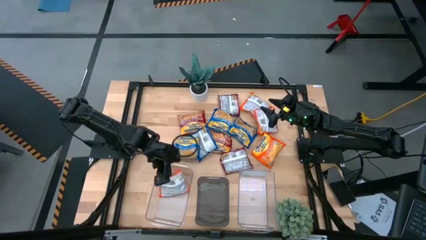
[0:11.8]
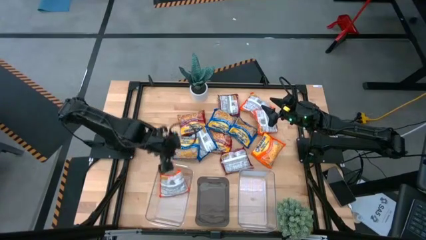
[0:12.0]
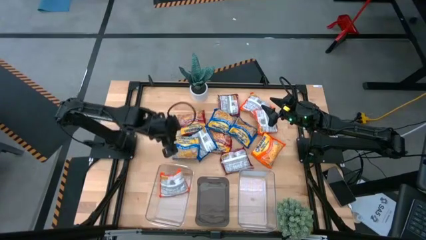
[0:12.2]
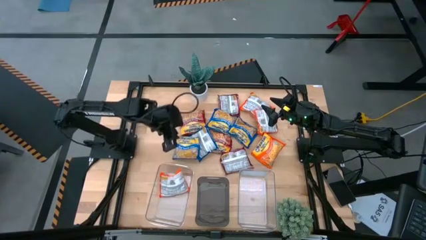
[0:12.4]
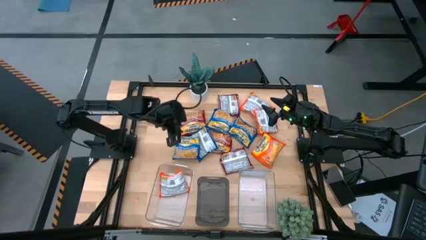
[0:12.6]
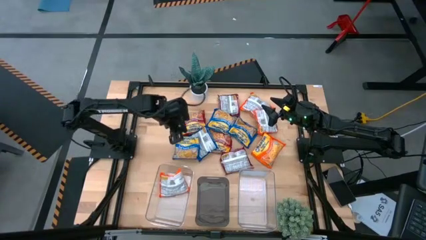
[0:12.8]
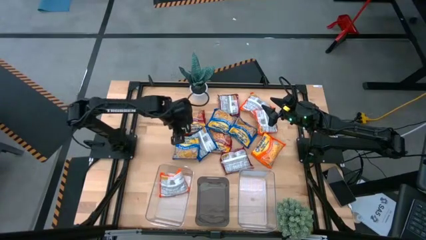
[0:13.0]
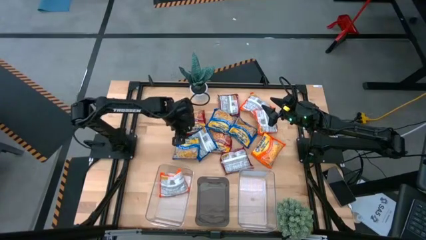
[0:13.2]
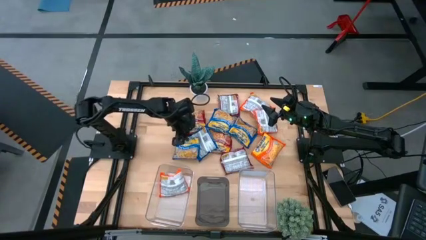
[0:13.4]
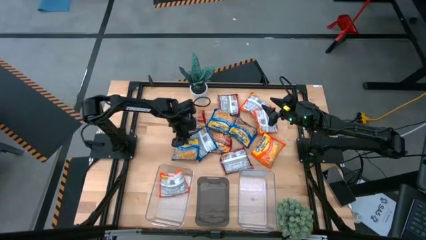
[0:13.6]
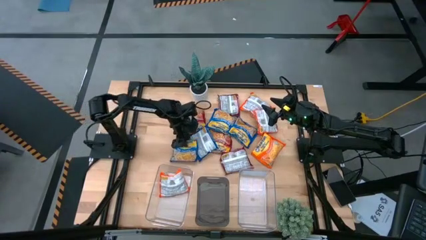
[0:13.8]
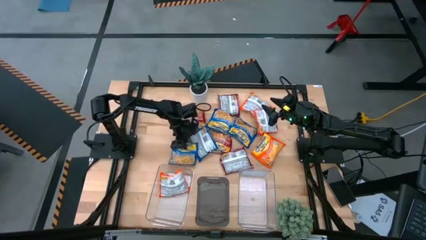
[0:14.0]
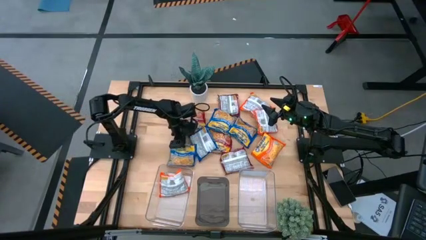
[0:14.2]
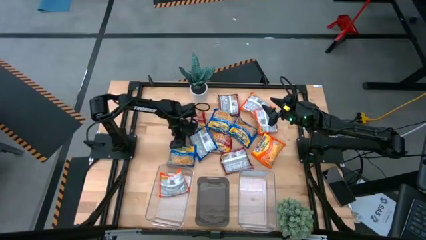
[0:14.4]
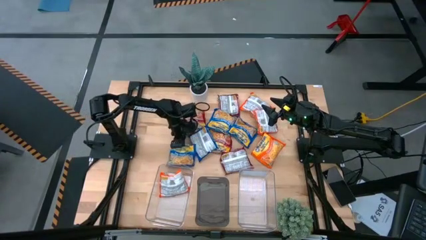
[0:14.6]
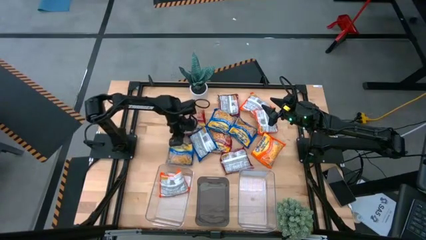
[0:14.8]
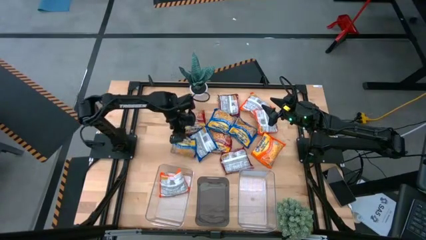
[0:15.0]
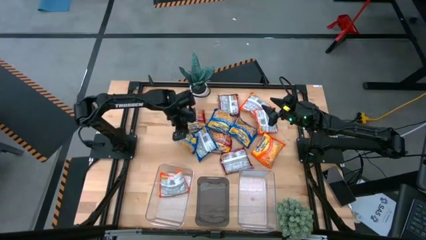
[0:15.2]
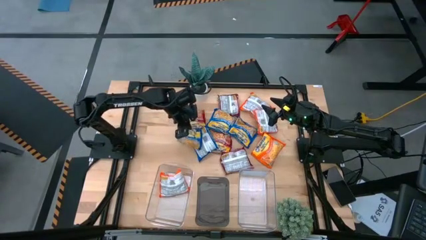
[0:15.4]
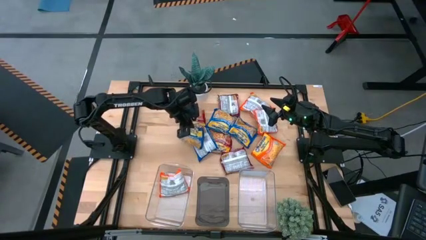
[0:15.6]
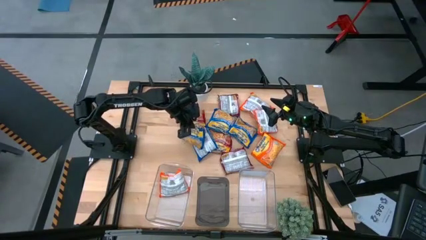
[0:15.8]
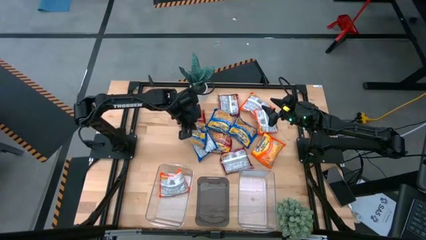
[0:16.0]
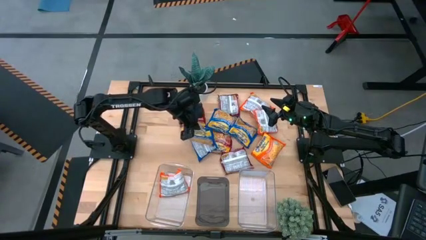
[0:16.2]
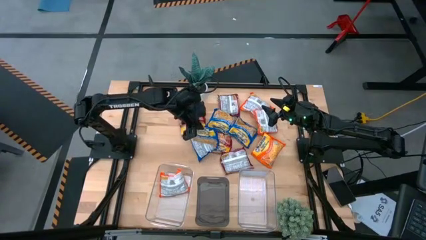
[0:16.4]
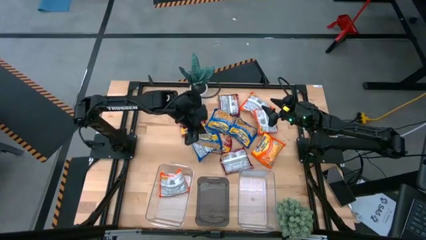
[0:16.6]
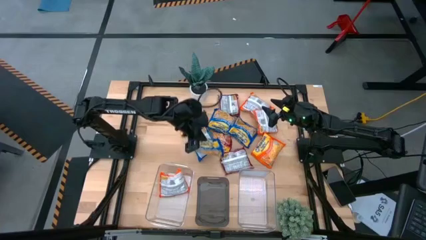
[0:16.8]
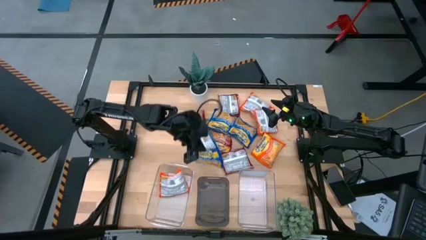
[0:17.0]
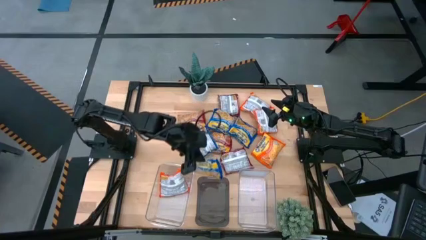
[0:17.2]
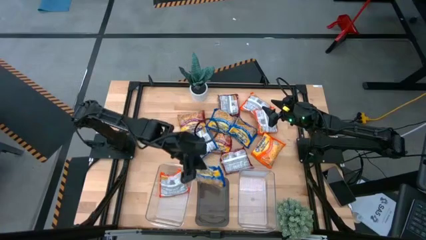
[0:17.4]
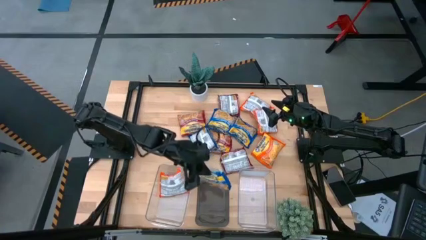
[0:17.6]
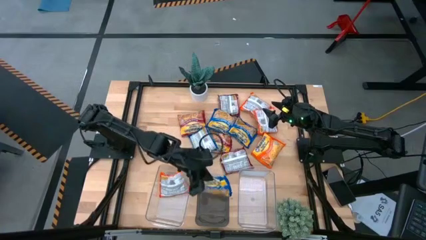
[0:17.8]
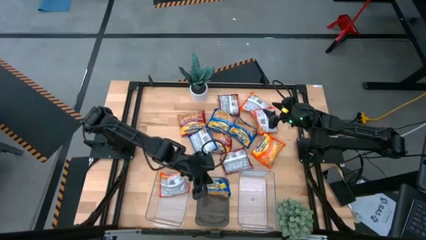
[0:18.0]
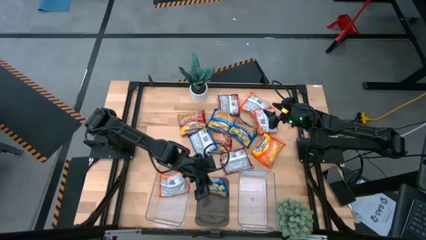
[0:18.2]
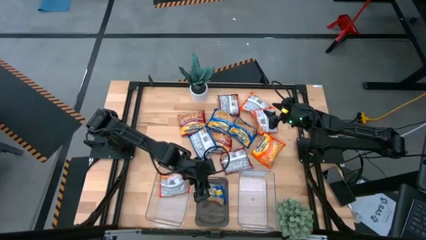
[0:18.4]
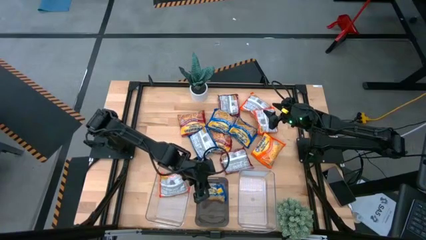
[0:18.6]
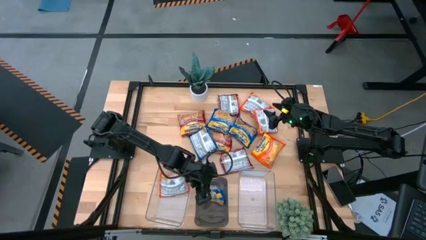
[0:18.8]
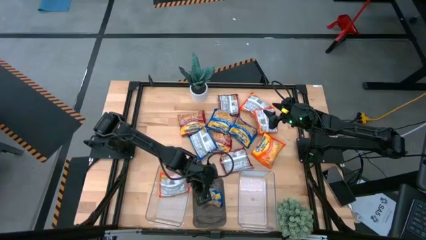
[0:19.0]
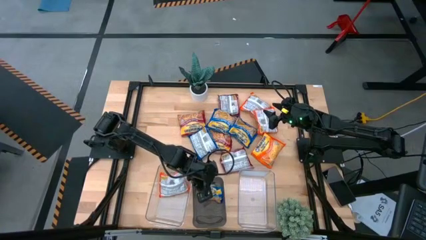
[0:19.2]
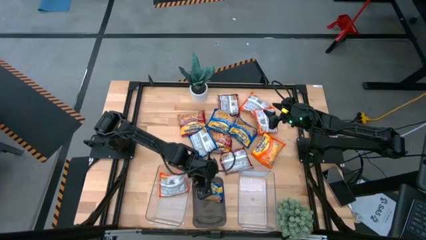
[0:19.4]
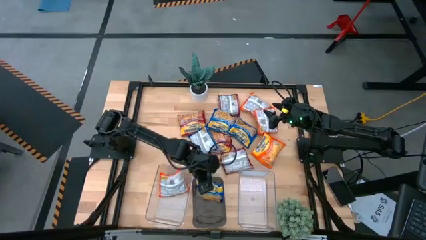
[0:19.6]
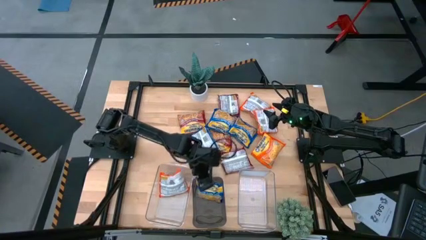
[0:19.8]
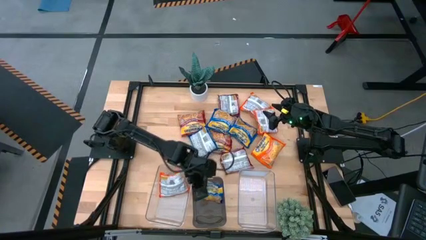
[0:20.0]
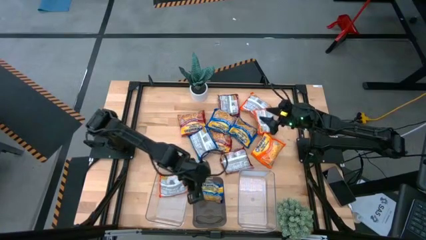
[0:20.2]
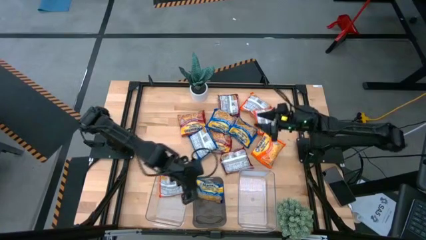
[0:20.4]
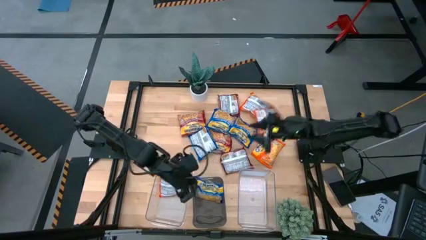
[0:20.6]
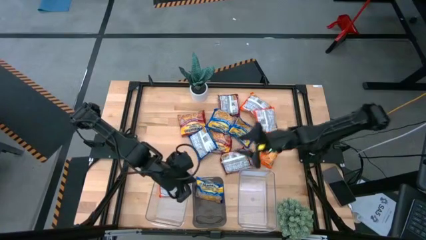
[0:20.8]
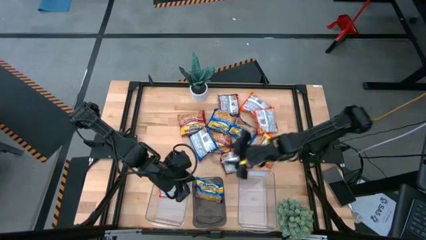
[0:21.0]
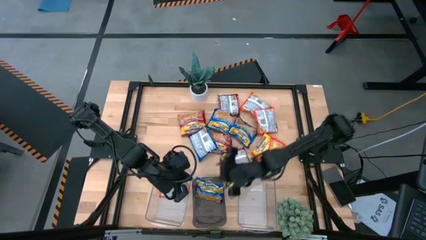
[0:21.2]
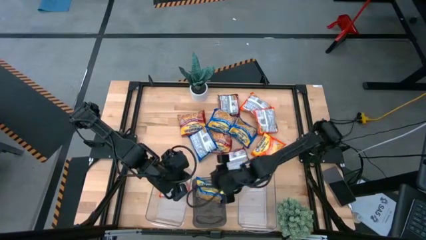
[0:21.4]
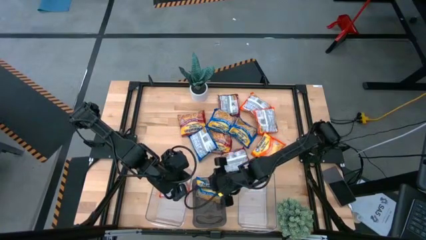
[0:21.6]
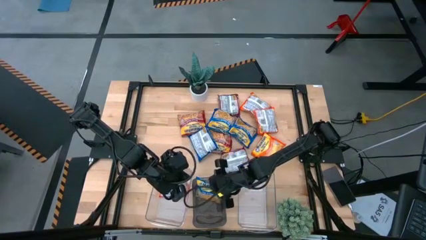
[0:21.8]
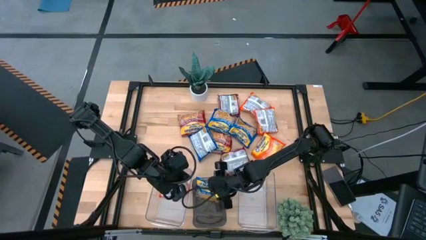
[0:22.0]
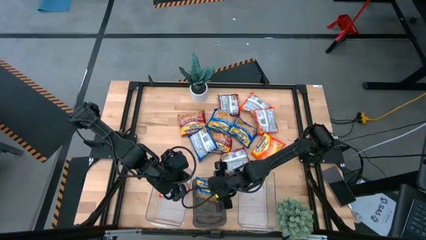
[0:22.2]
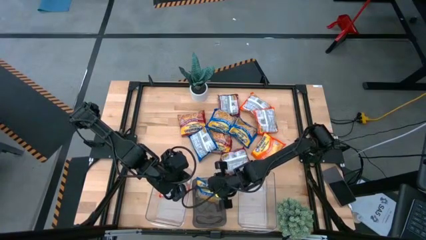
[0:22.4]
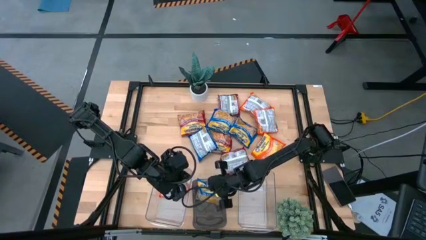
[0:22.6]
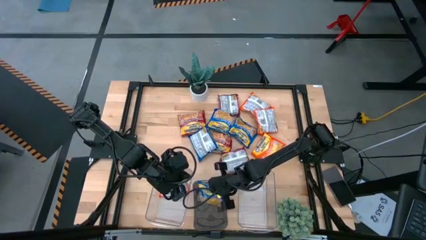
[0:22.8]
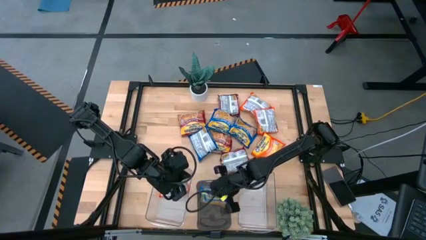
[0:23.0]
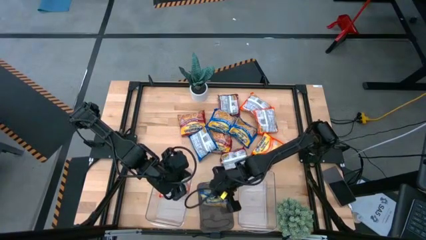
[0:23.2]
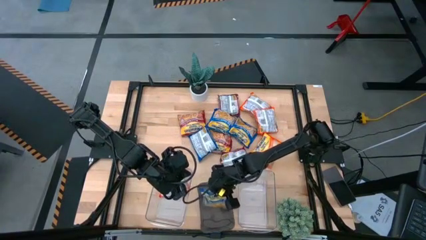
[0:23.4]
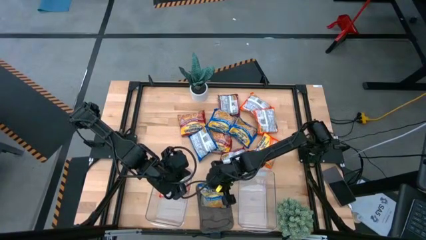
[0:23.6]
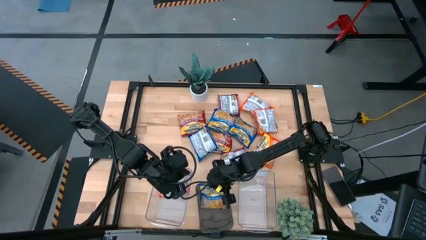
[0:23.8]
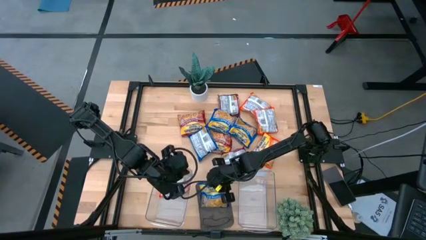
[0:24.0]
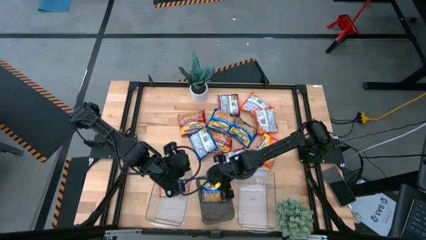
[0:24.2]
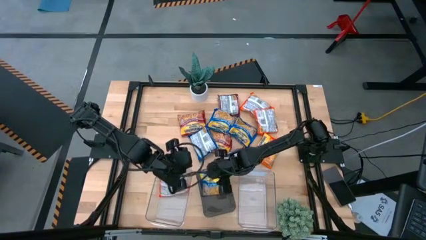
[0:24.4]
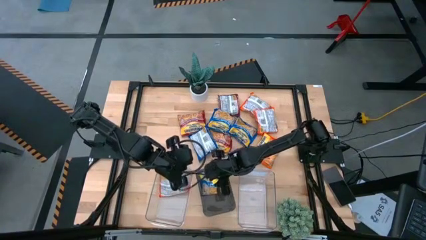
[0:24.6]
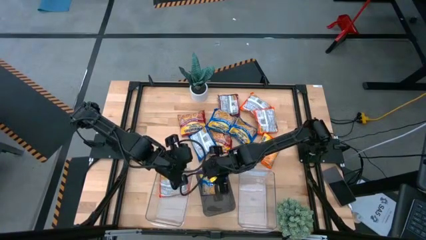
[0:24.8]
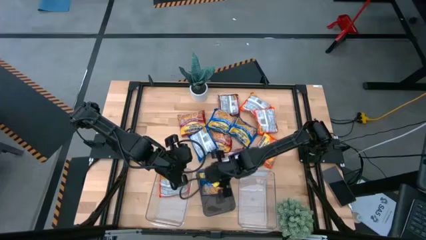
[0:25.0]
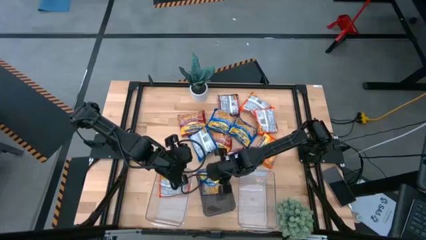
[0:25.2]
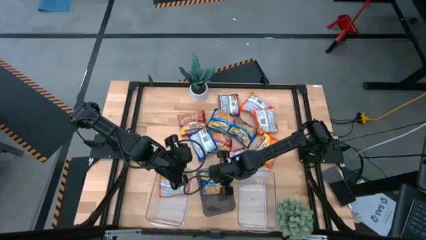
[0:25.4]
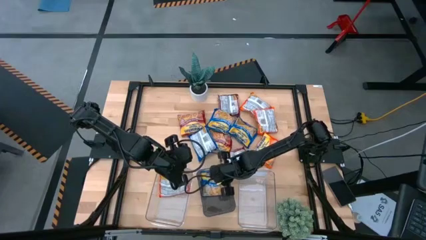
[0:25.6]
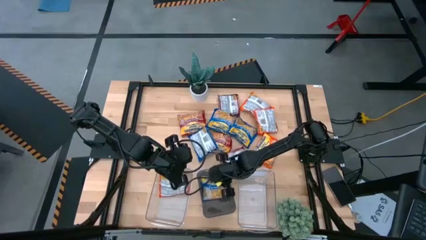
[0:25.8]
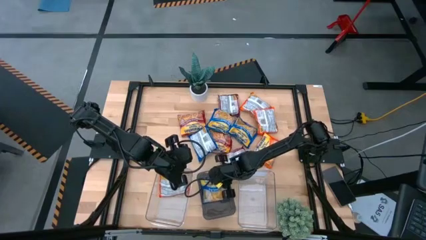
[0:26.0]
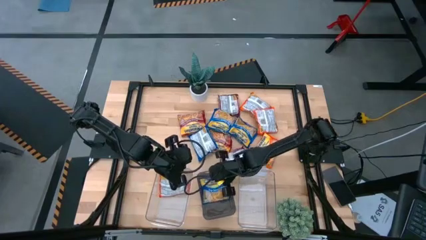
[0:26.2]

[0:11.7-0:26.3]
Task: Sort Maruchan noodles
Put the blue noodle pack into the black bin

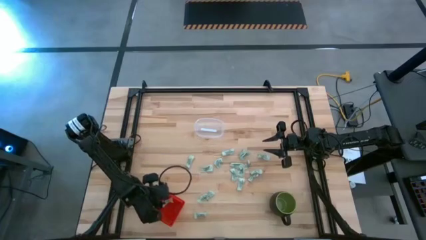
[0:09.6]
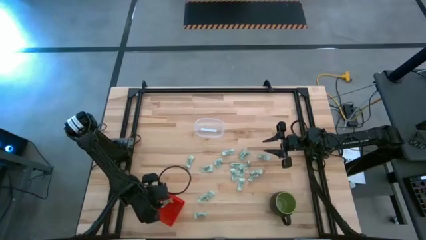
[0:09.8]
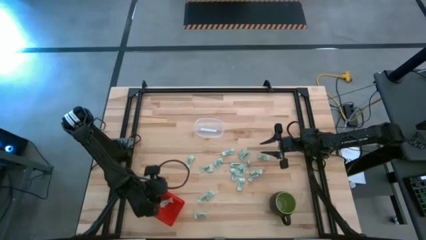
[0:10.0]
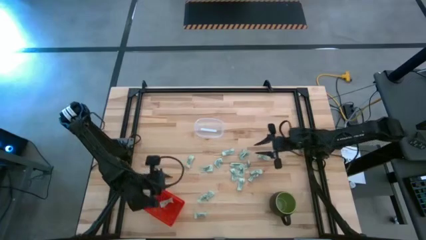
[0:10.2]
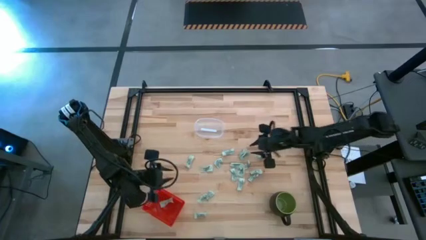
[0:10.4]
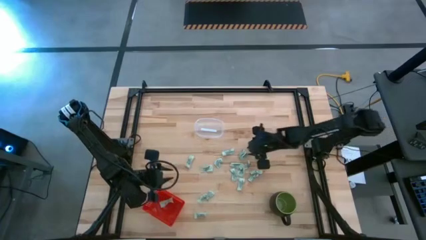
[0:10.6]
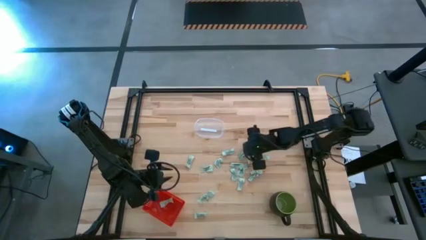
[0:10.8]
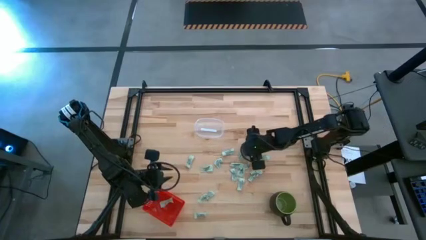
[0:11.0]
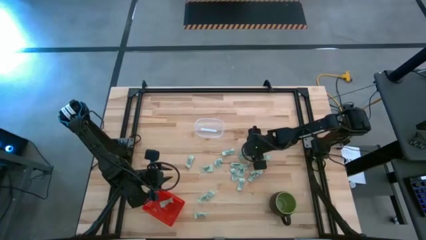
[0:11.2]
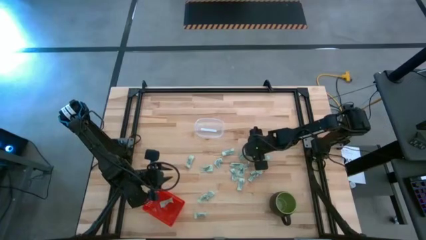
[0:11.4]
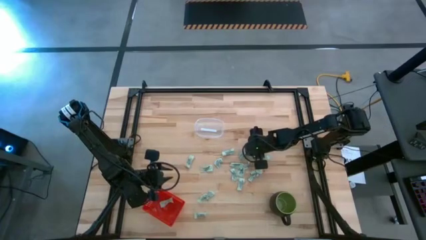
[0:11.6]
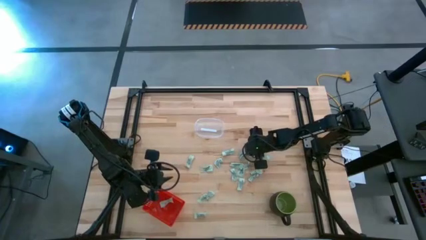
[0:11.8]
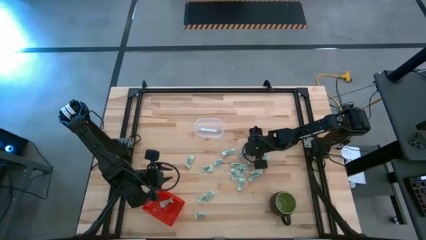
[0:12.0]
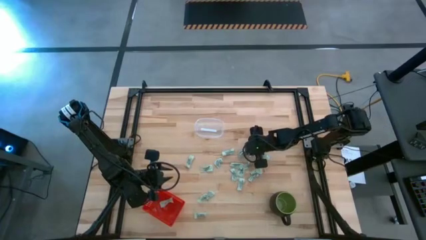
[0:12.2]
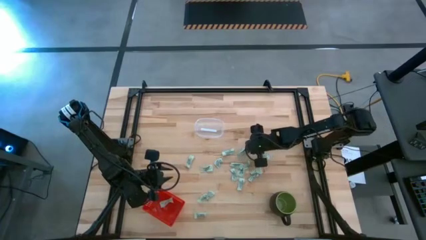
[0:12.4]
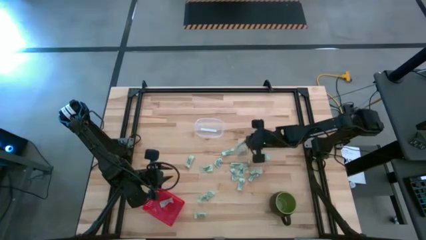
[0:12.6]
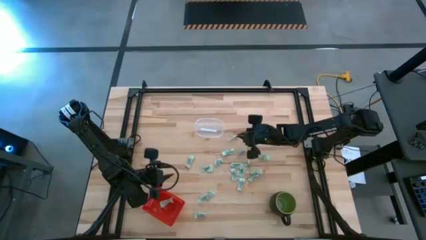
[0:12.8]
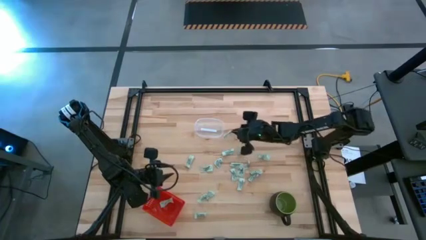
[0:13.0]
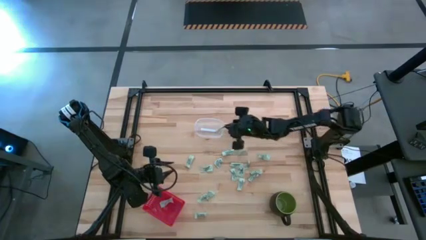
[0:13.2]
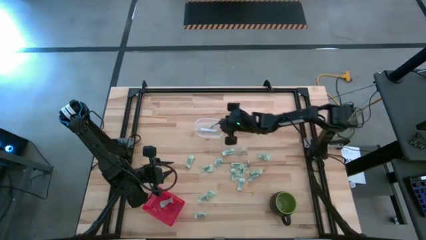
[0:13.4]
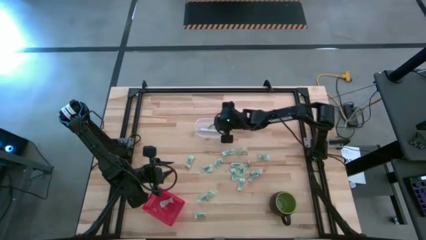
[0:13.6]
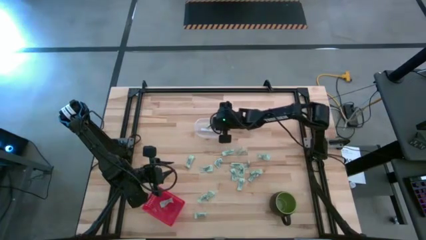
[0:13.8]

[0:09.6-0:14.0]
Task: Pick and place items into bin
Put the stevia packet into the transparent bin
